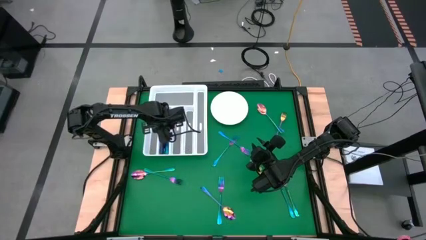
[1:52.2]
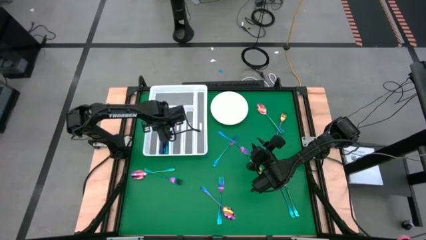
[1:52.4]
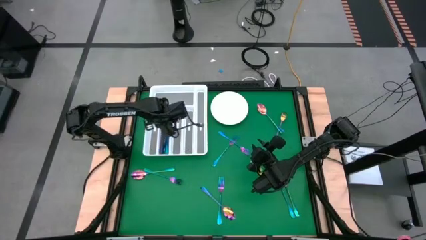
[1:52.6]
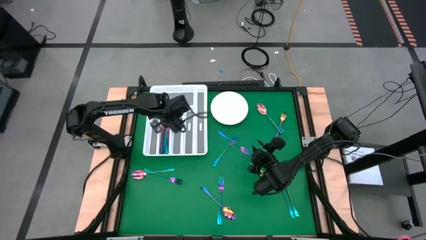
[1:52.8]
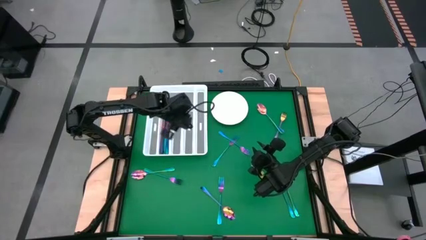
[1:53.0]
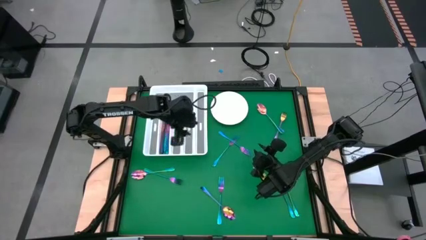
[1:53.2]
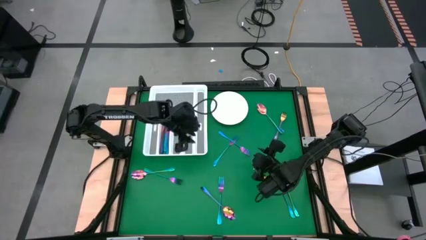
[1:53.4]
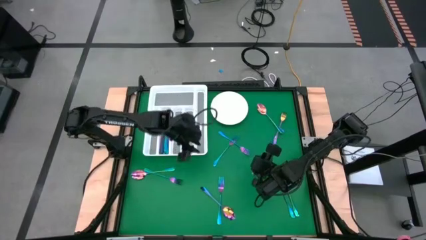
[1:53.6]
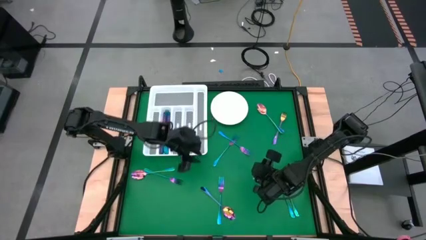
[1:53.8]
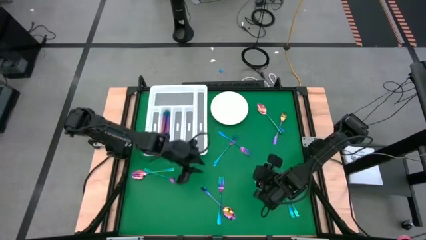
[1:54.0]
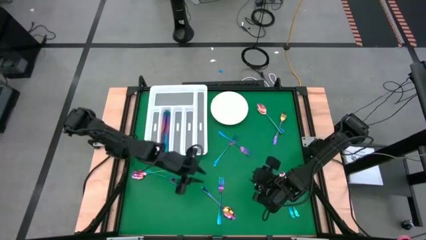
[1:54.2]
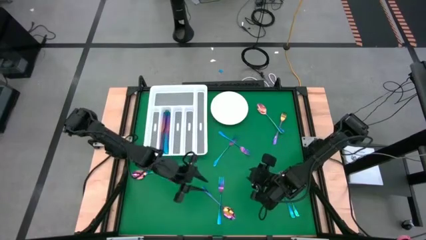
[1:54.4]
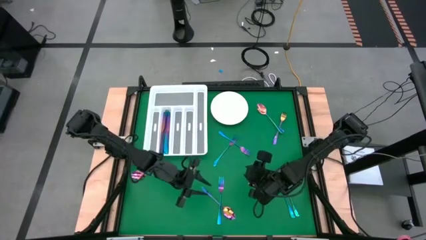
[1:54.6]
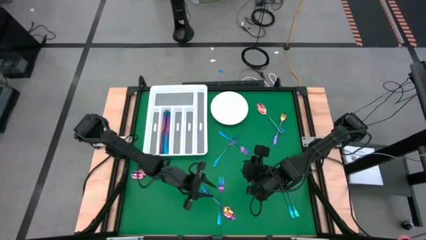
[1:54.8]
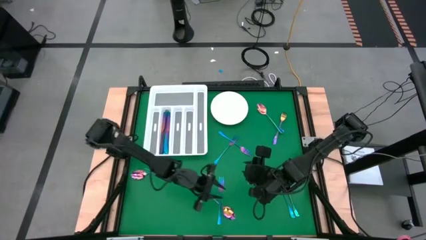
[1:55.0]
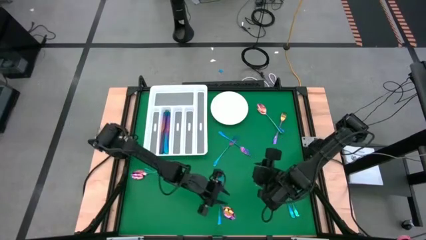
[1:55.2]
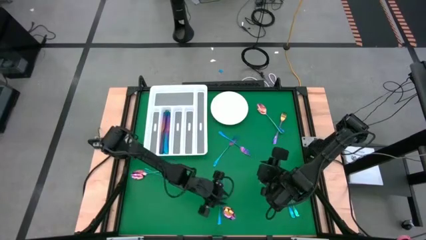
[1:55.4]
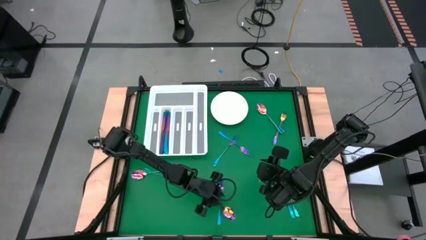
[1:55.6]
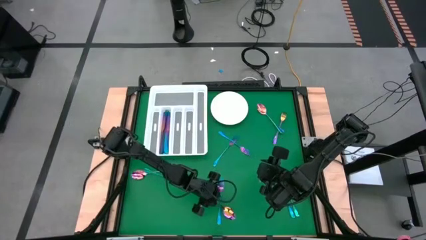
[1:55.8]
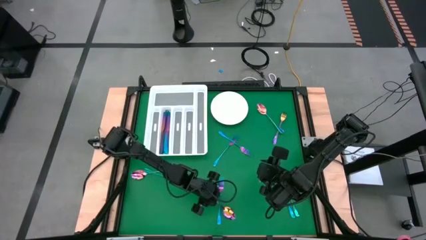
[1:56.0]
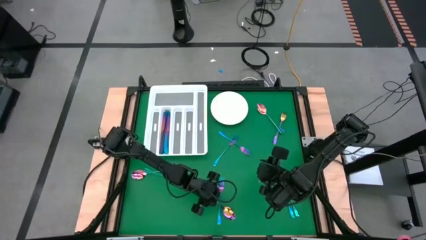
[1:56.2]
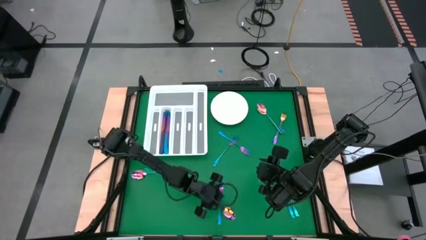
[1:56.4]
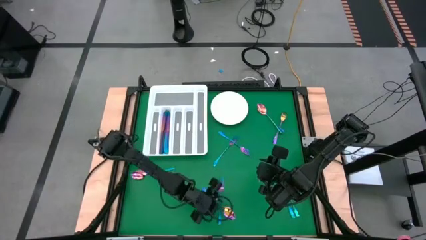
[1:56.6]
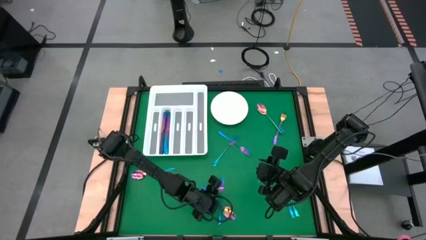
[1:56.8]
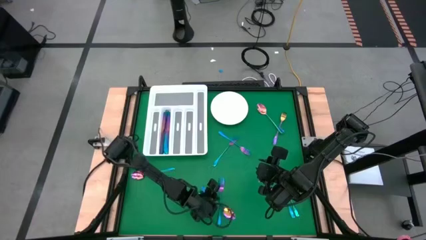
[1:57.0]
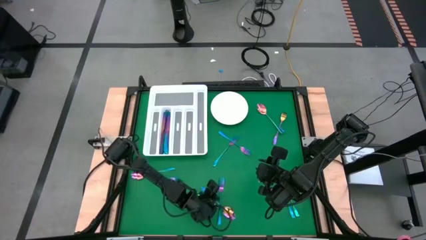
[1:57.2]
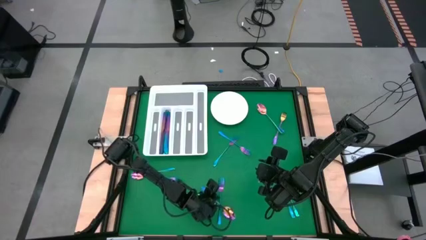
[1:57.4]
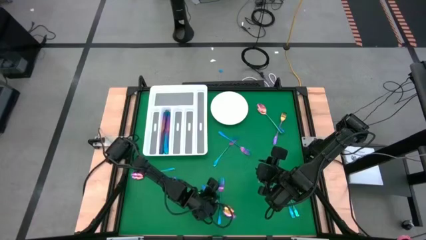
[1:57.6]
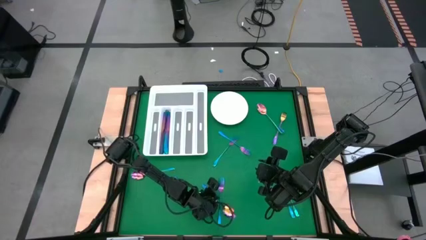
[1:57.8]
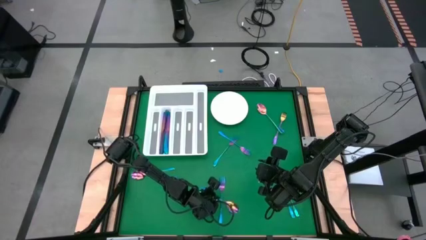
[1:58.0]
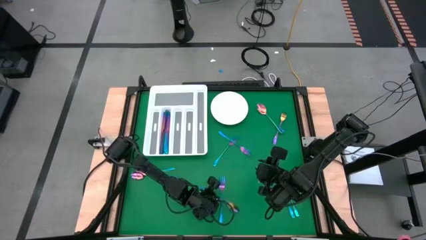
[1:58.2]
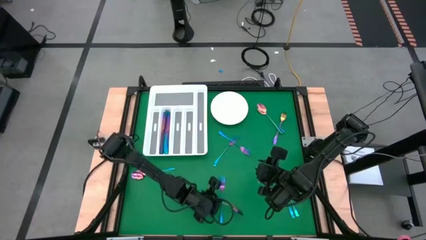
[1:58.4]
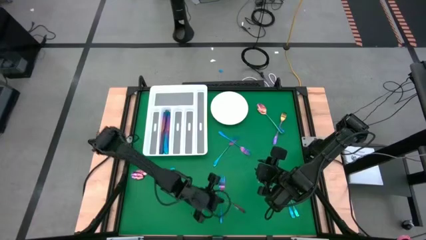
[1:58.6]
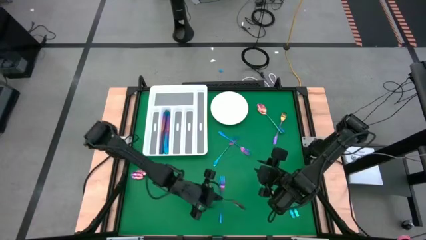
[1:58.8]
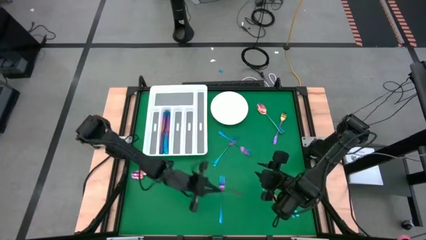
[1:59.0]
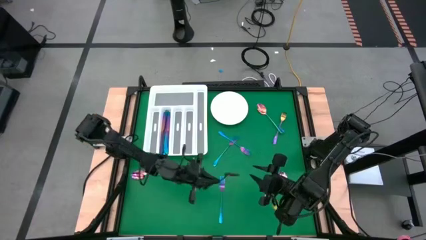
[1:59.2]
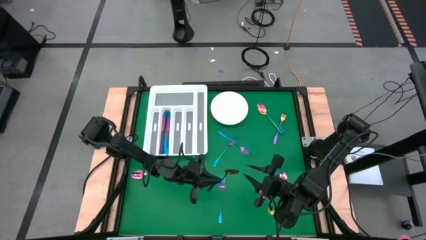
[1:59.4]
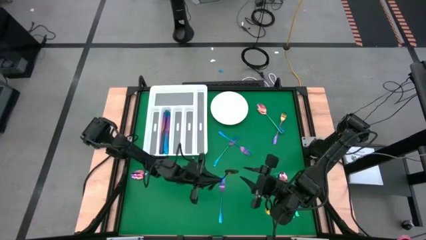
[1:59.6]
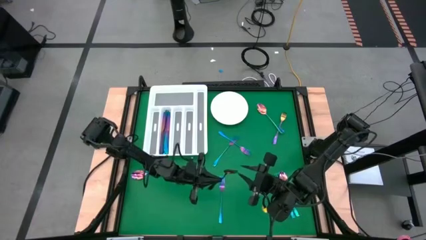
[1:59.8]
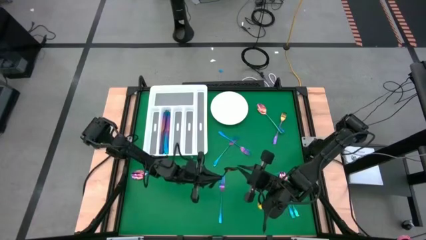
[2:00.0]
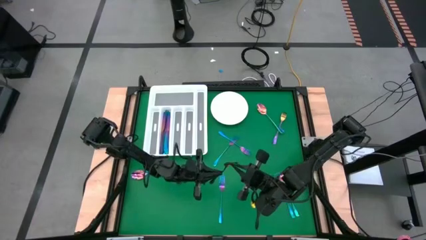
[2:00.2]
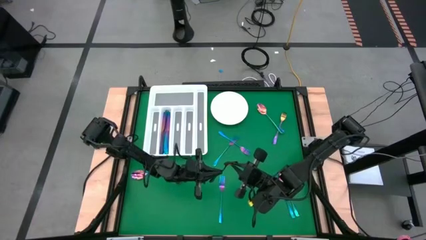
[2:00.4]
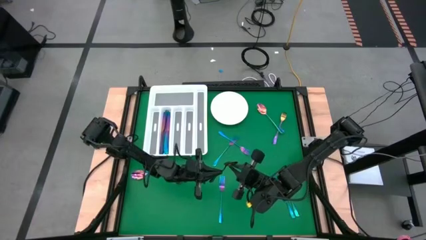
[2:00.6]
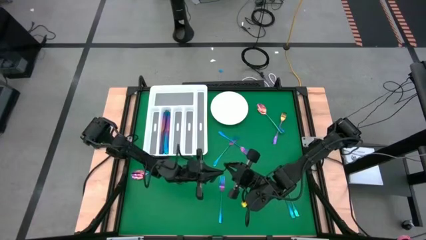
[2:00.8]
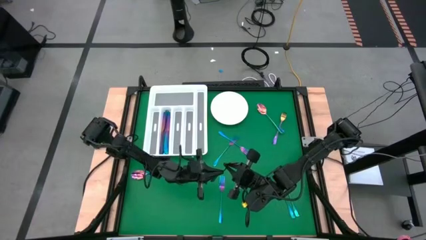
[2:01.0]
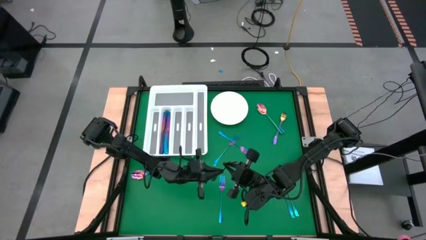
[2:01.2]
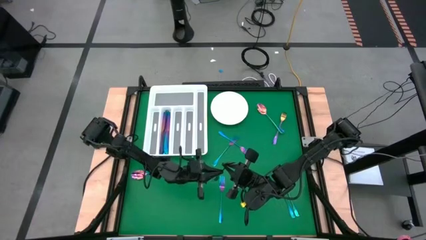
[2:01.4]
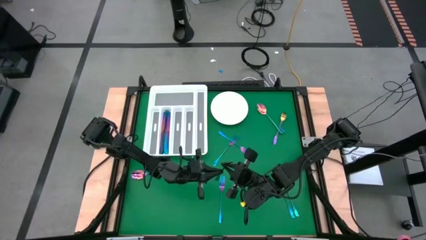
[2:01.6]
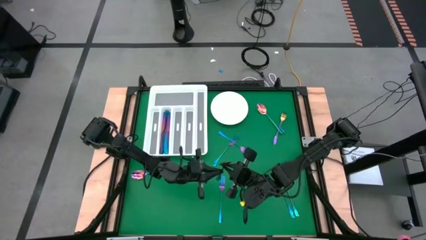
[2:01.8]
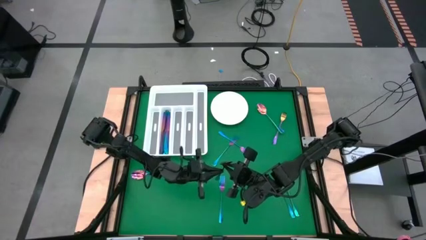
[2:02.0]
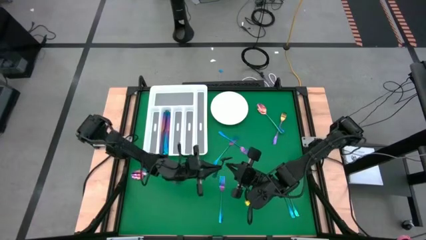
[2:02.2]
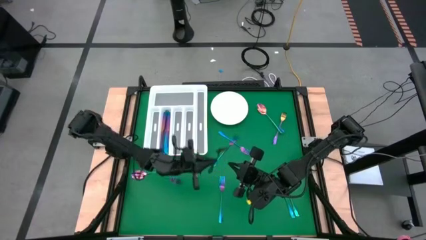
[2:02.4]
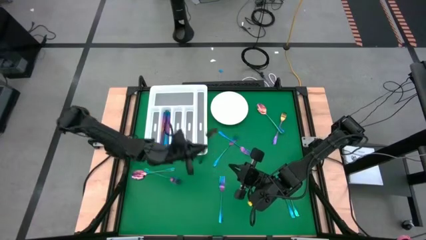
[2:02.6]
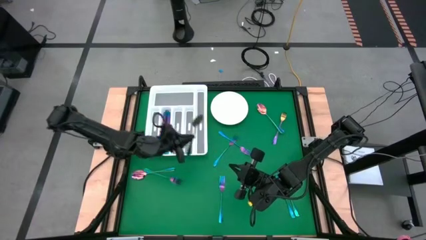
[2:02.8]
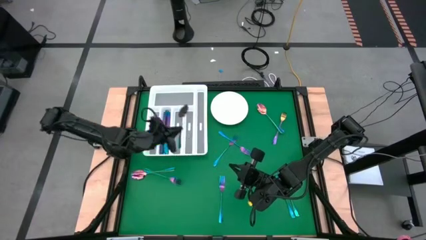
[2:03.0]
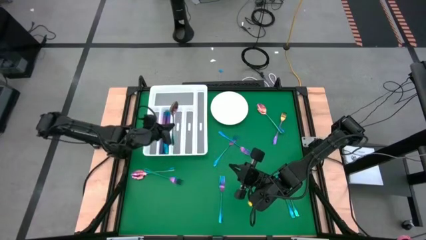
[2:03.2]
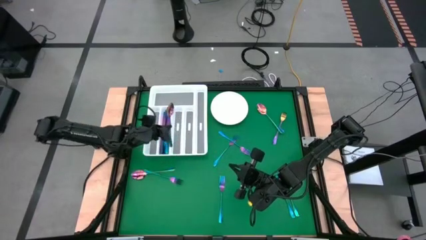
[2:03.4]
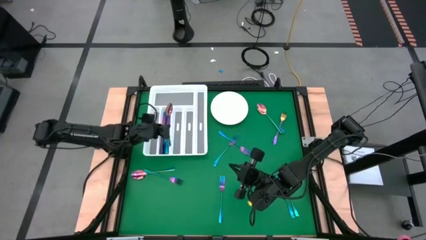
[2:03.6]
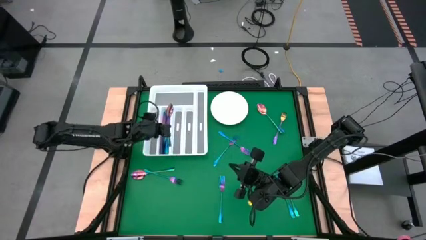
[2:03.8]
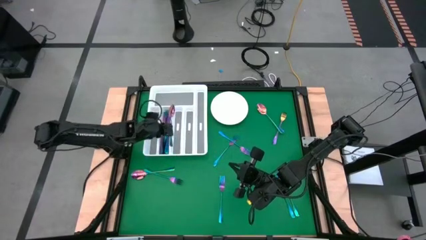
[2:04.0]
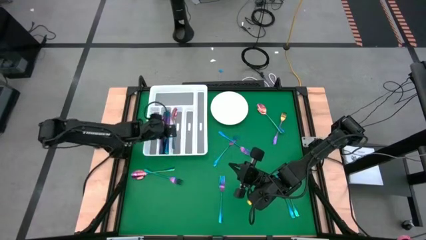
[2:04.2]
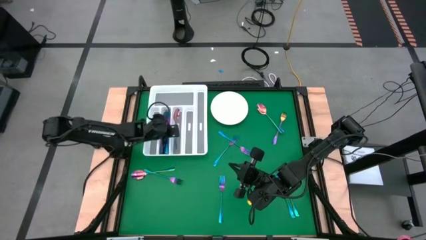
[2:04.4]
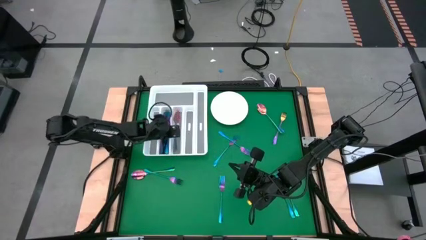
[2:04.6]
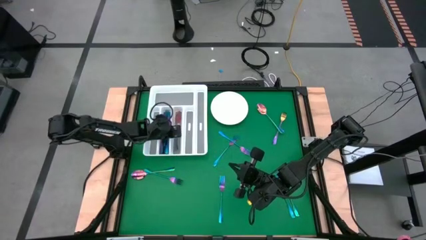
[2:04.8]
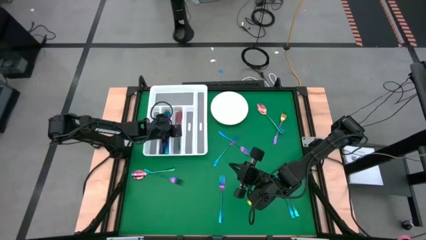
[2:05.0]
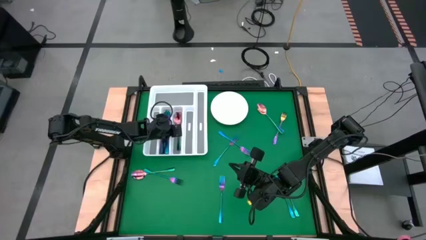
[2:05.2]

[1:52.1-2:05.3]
Task: Sort silverware
Put the blue spoon into the silverware tray
